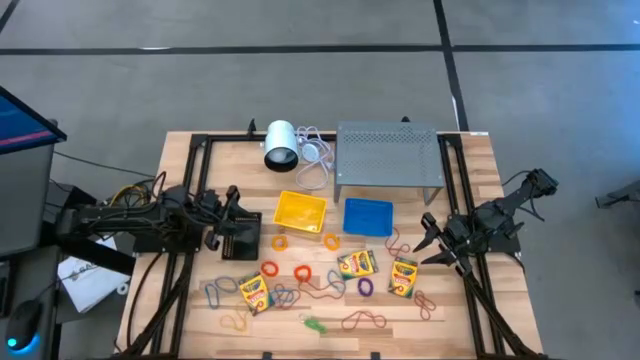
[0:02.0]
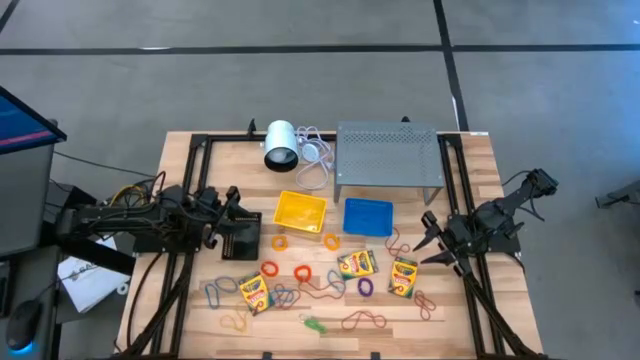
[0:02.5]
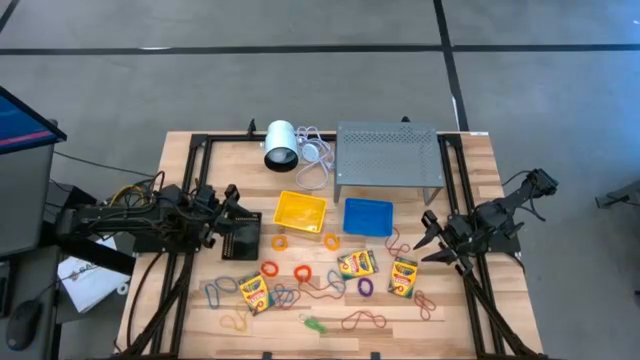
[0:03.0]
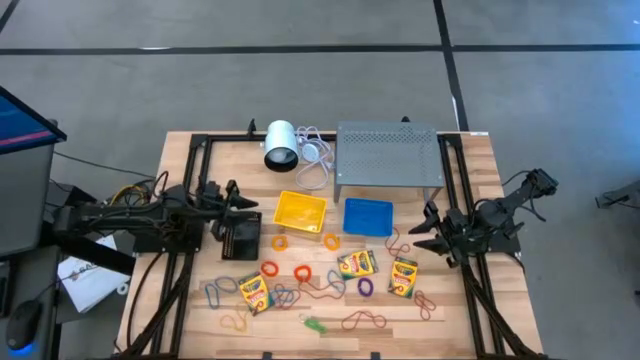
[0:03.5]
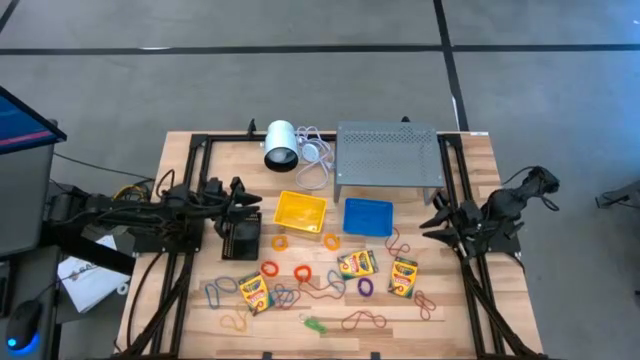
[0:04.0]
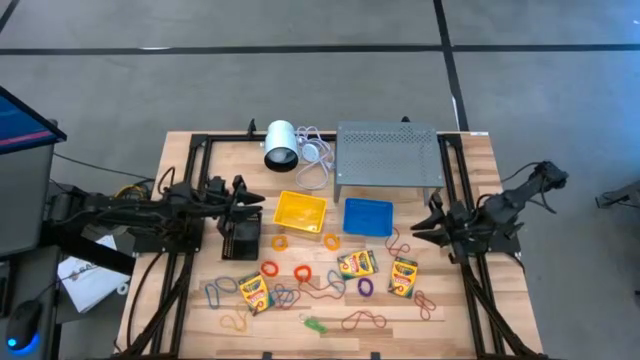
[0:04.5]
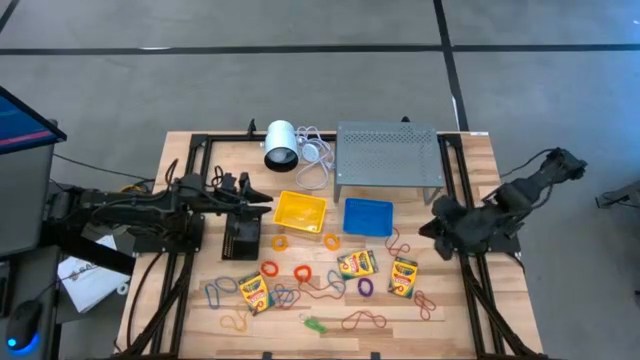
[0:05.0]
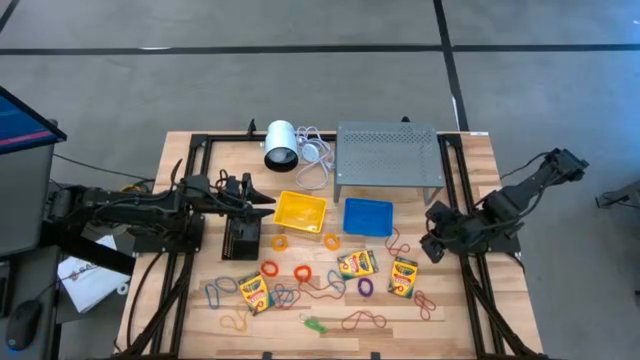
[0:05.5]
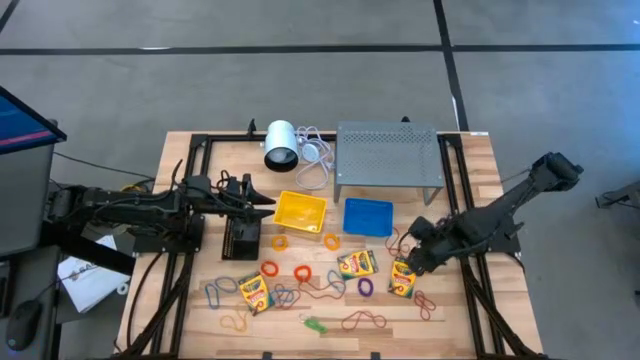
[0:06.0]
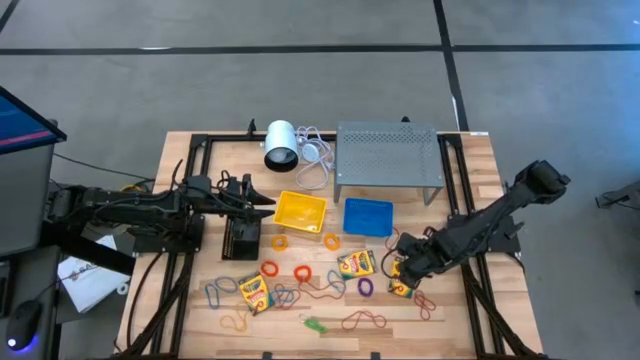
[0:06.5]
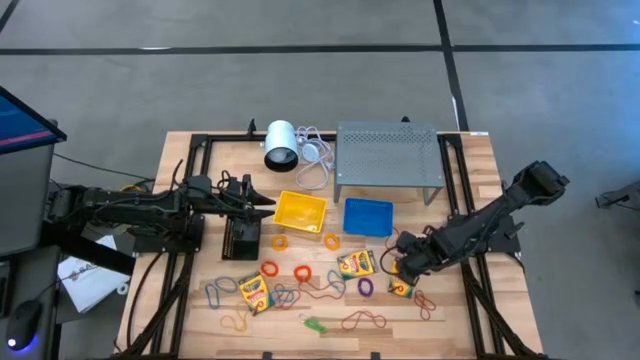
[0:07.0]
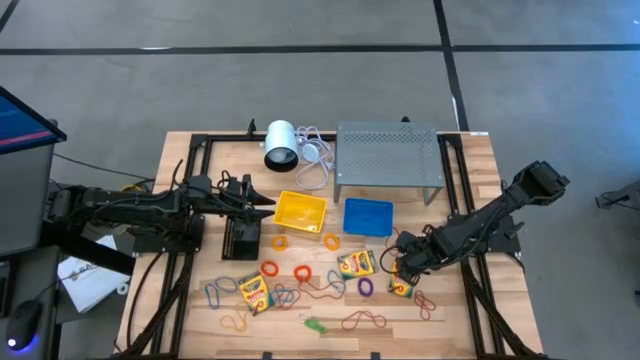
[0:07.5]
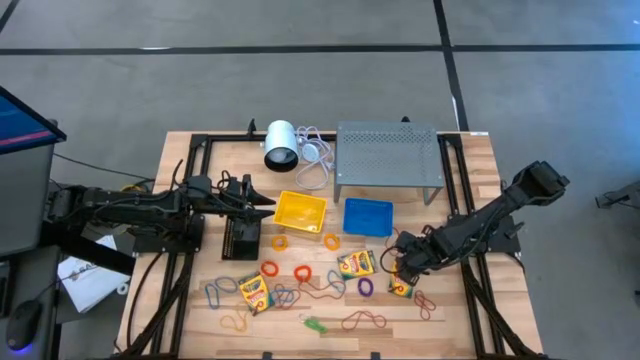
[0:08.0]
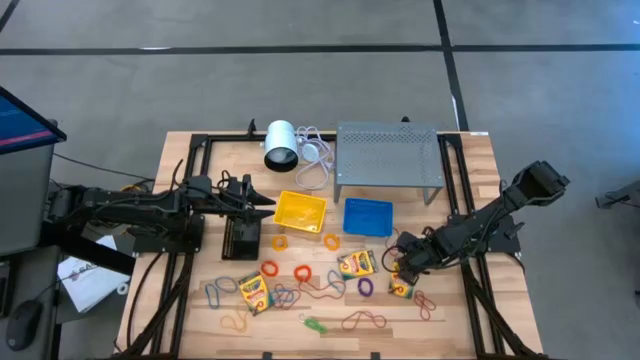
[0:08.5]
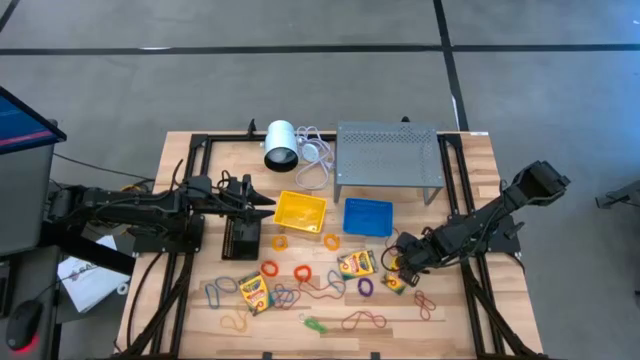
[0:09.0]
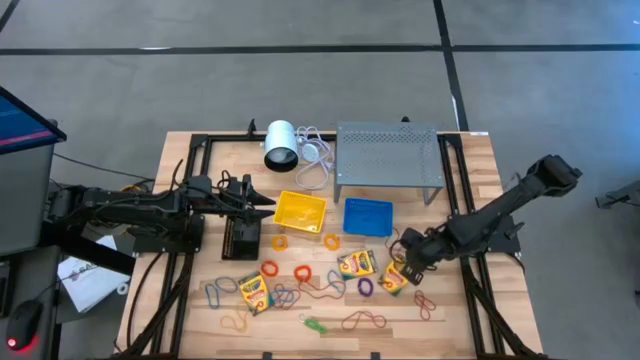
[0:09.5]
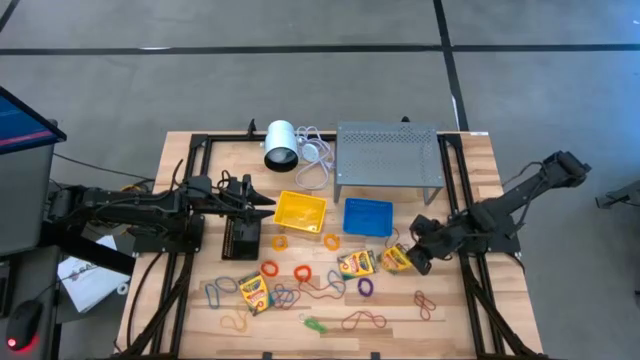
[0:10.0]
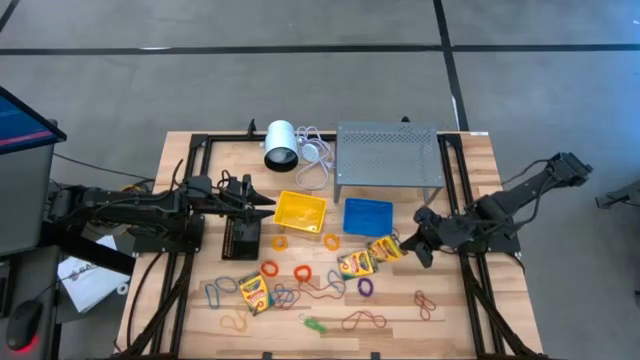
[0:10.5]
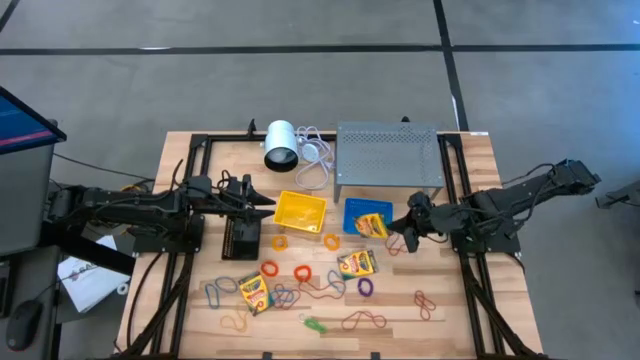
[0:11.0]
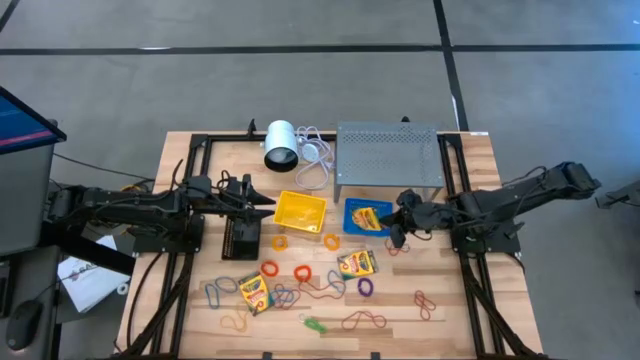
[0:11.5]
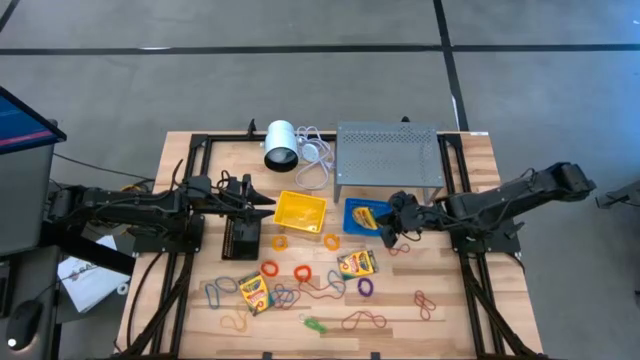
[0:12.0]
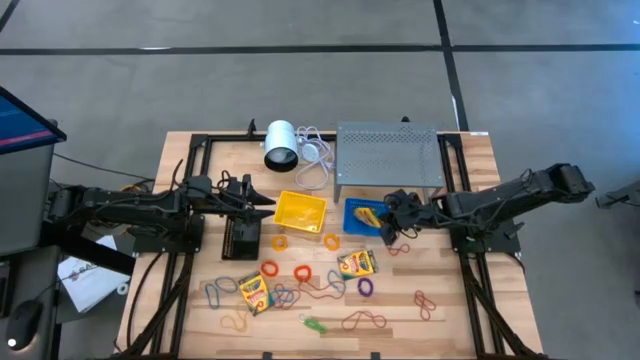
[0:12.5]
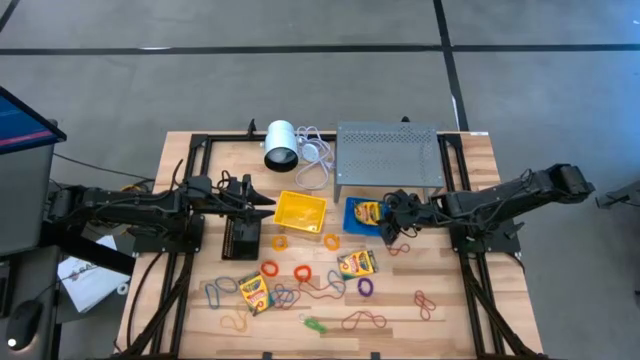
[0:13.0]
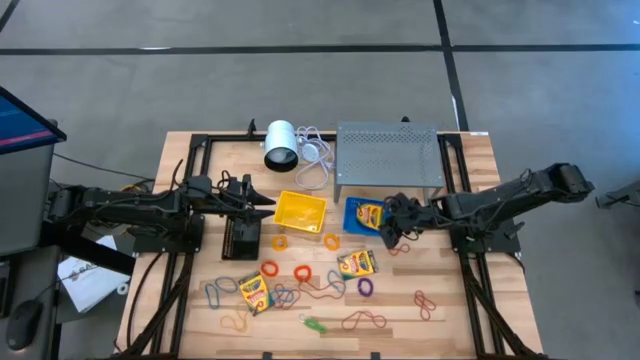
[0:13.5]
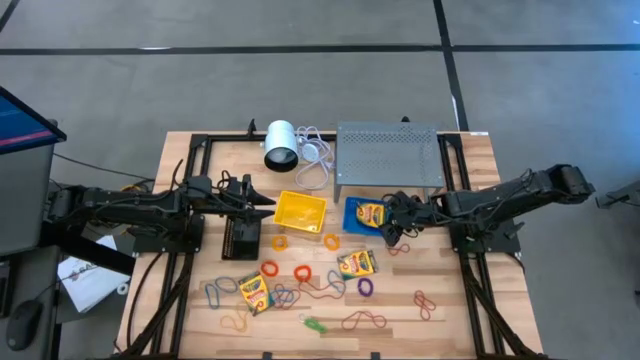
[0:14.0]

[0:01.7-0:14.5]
Task: Pick & Place Office Desk Supplies
Put the right crayon box into the blue bin

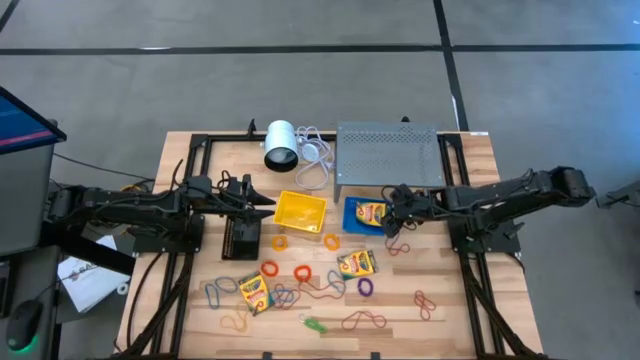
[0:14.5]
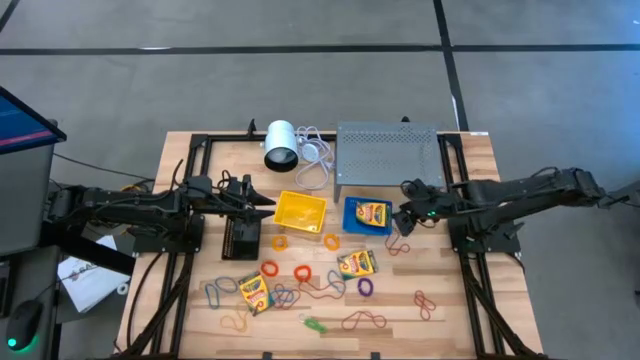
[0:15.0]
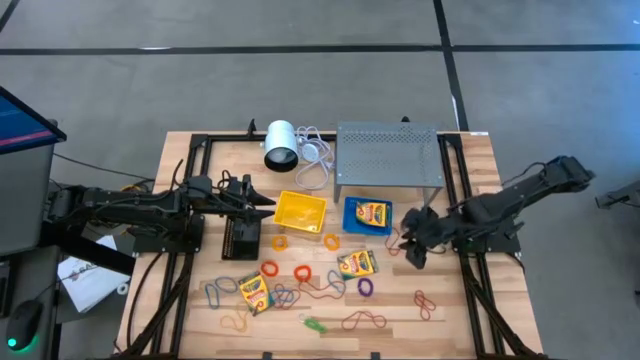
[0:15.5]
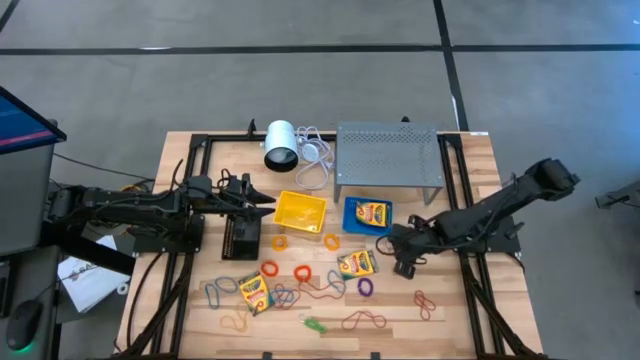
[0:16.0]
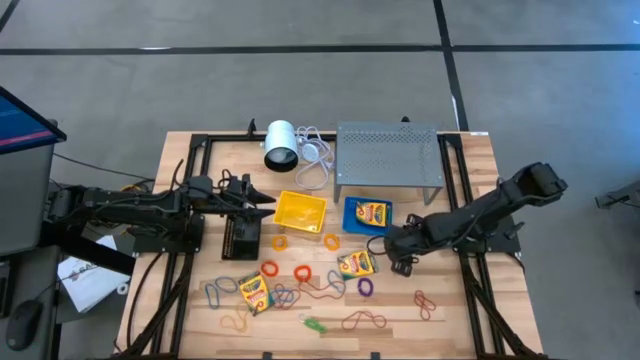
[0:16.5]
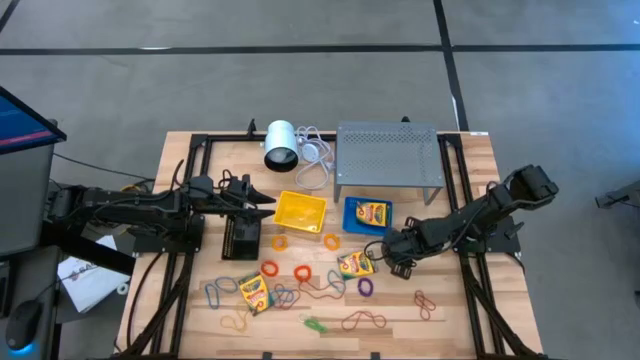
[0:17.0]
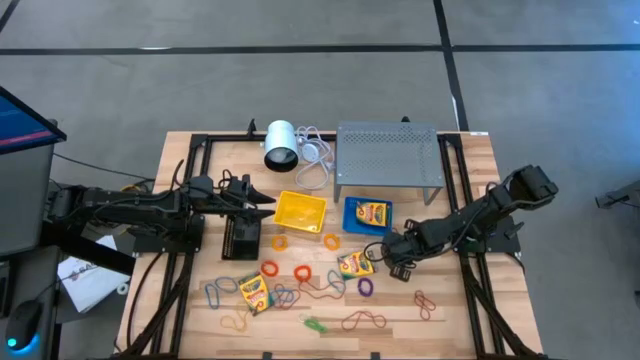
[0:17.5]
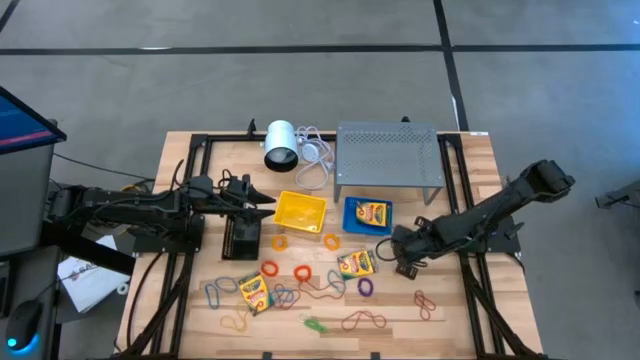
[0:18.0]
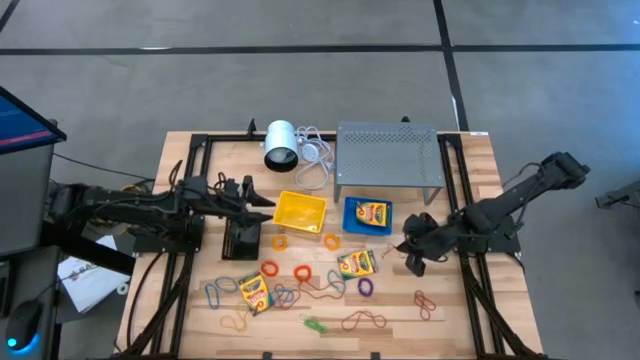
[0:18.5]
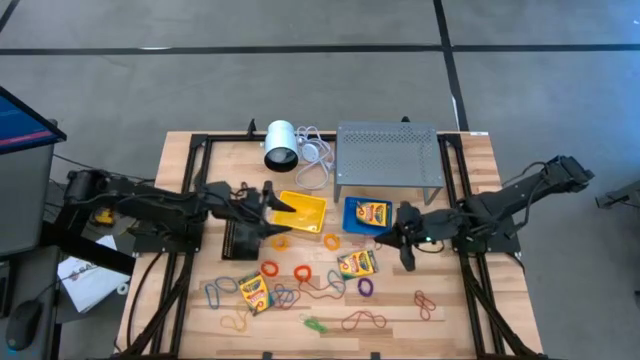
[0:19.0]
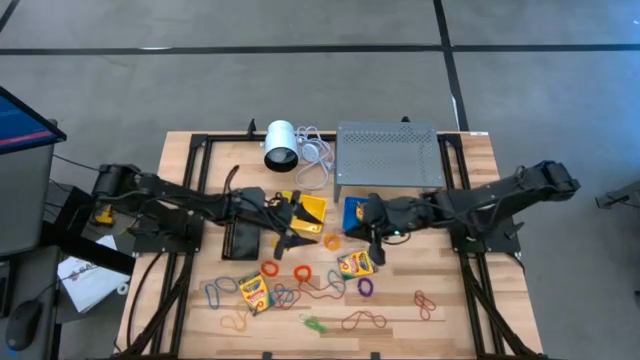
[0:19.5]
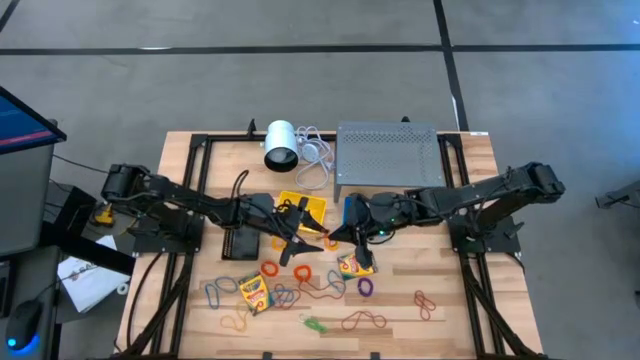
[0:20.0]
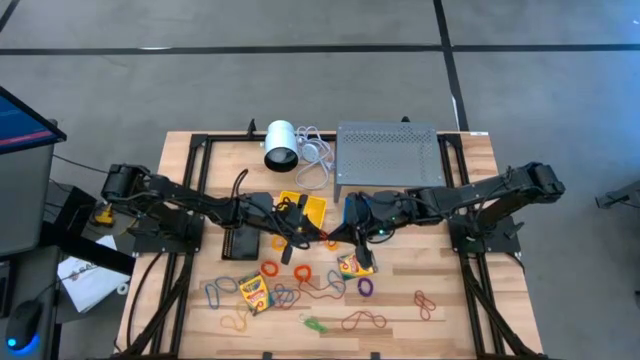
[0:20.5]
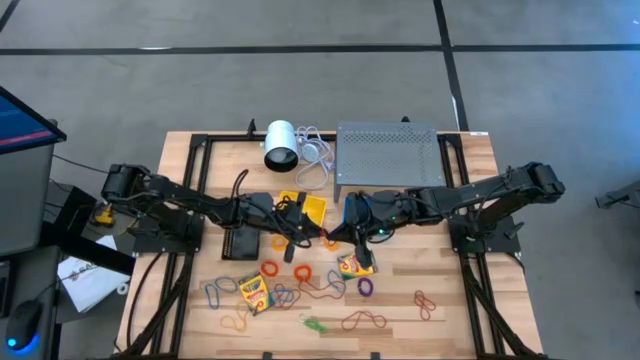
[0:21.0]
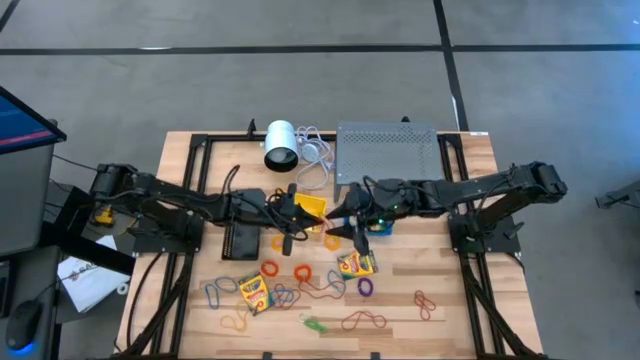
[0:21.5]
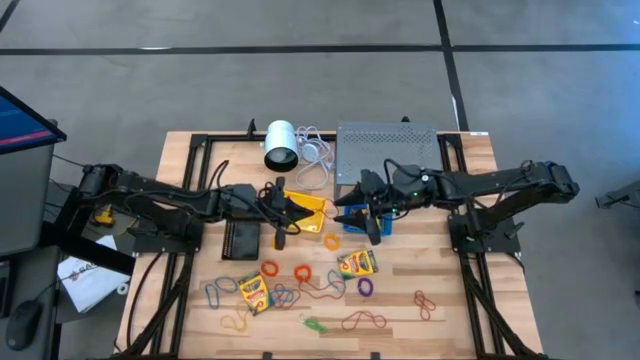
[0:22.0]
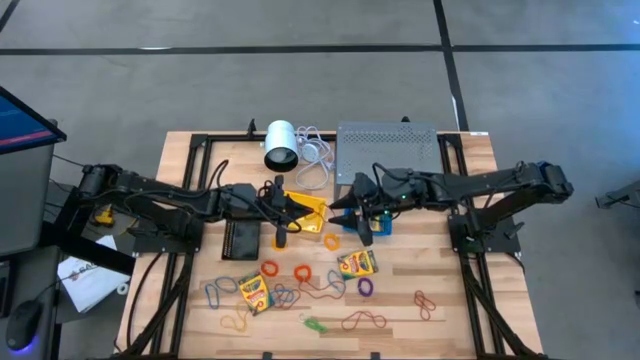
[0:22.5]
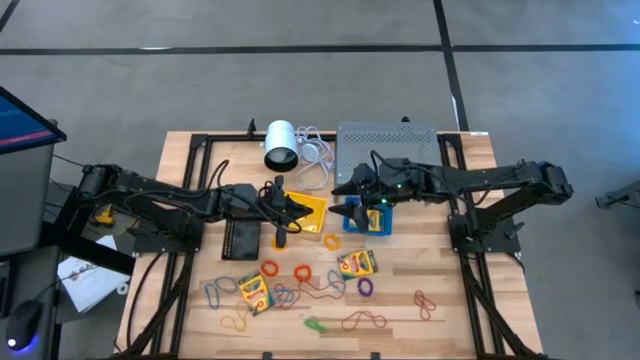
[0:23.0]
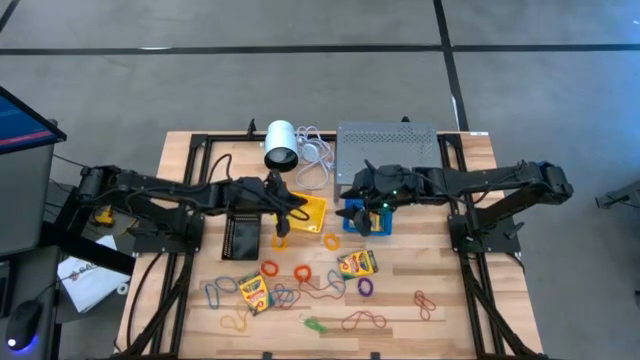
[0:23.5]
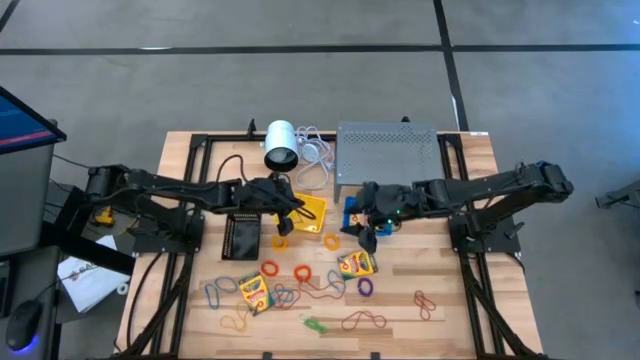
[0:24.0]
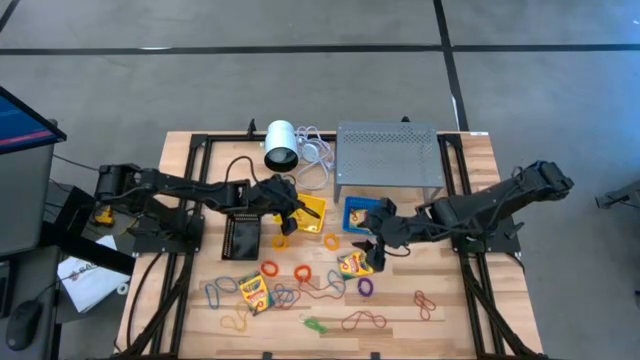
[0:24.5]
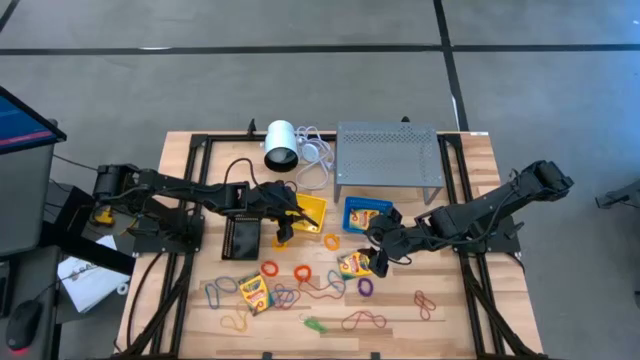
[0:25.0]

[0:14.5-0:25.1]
Put the red rubber band into the yellow bin
